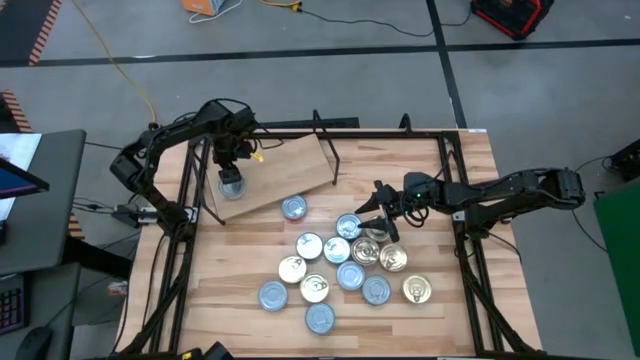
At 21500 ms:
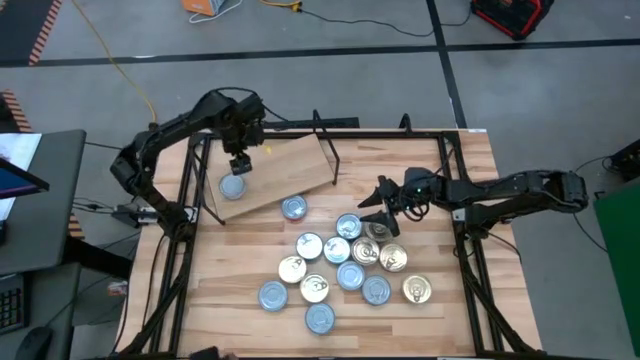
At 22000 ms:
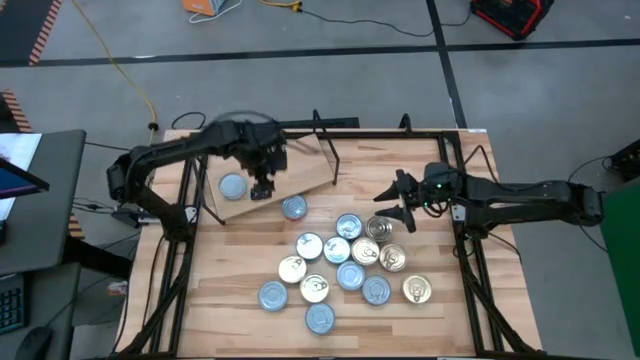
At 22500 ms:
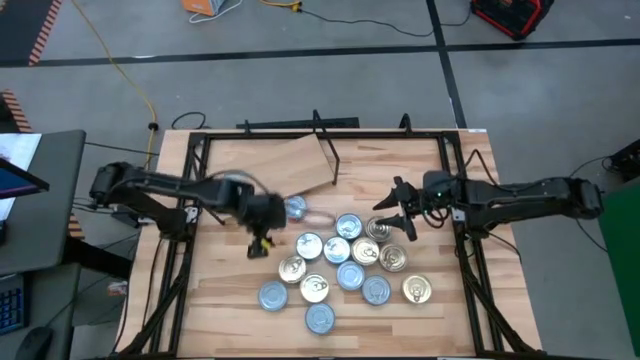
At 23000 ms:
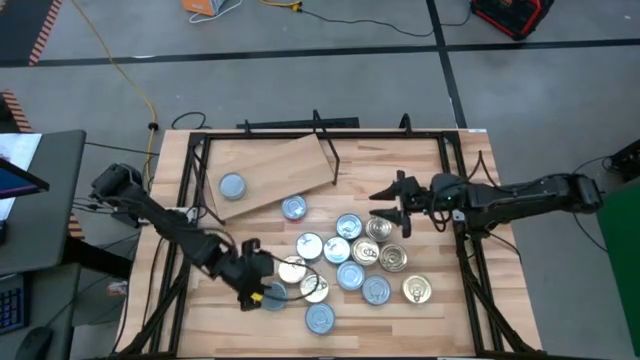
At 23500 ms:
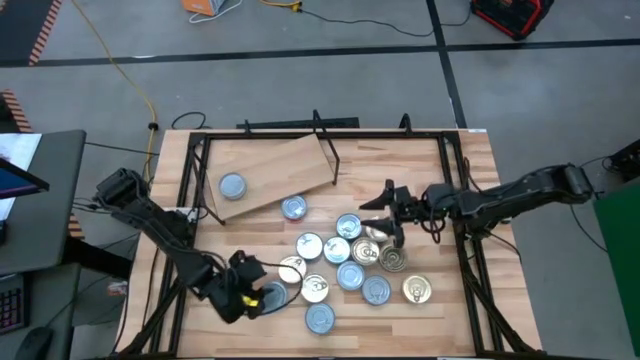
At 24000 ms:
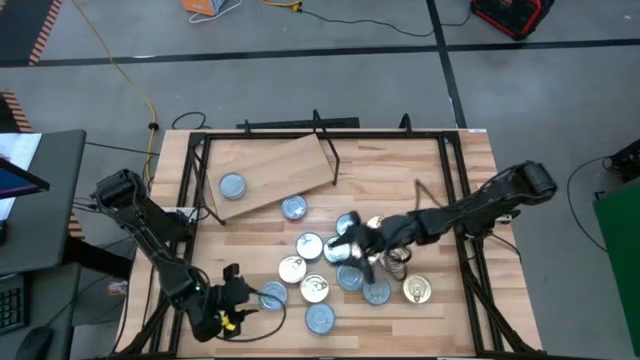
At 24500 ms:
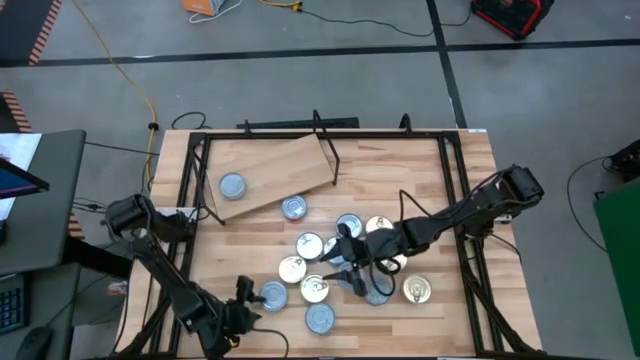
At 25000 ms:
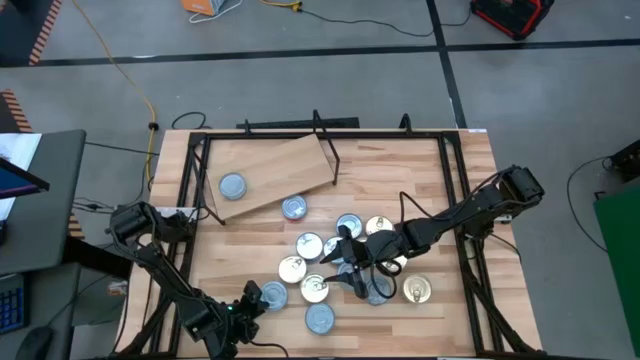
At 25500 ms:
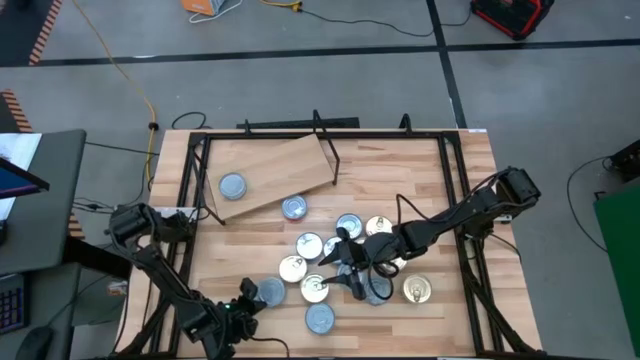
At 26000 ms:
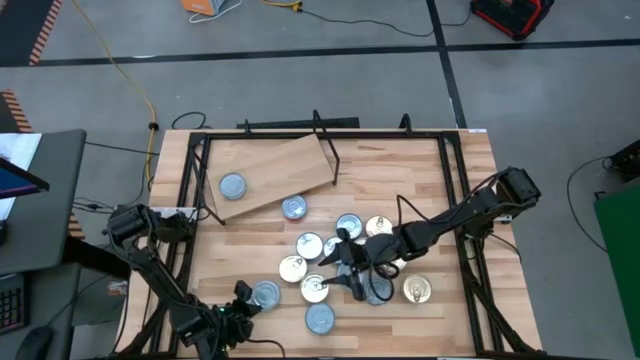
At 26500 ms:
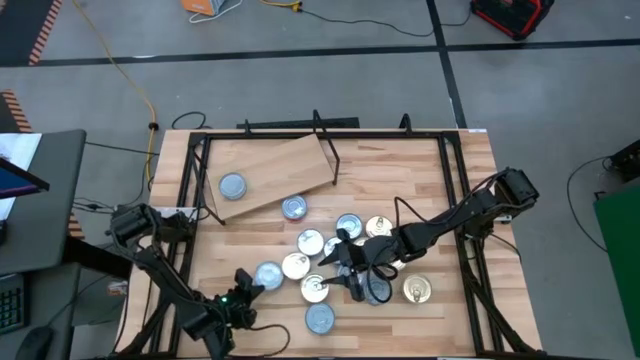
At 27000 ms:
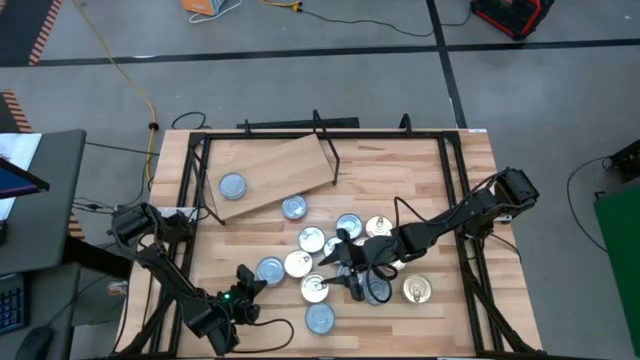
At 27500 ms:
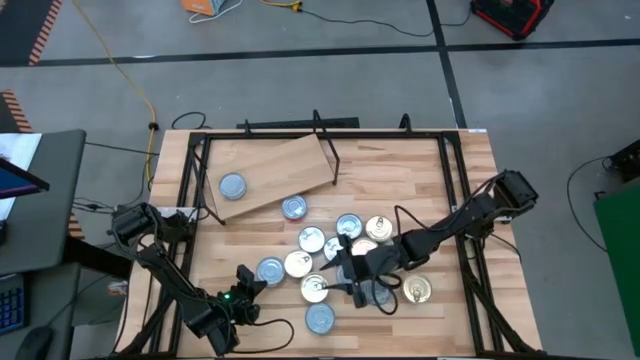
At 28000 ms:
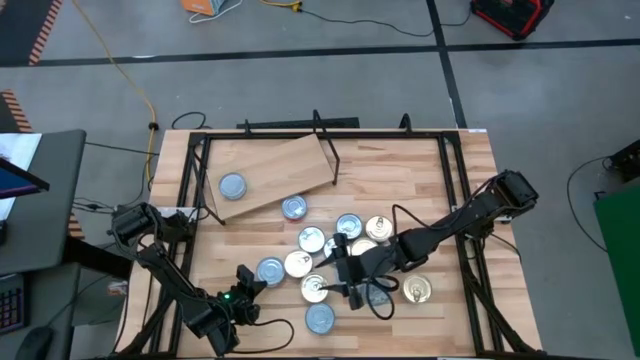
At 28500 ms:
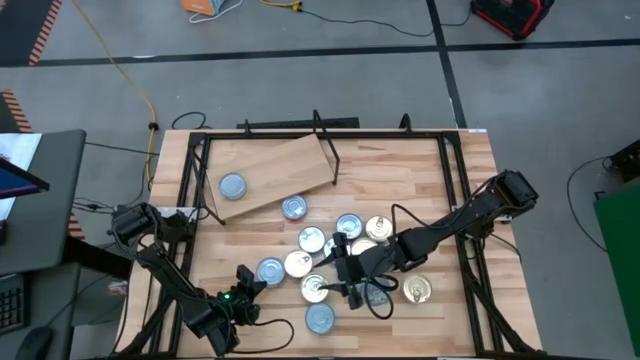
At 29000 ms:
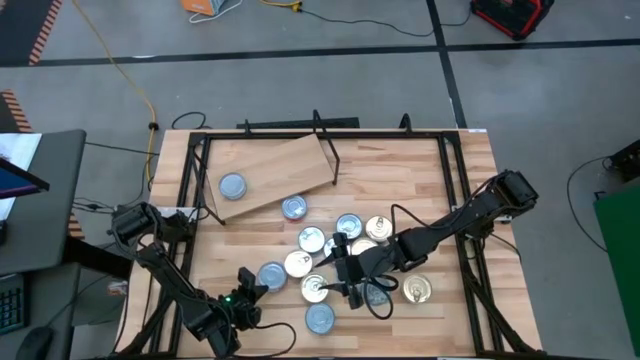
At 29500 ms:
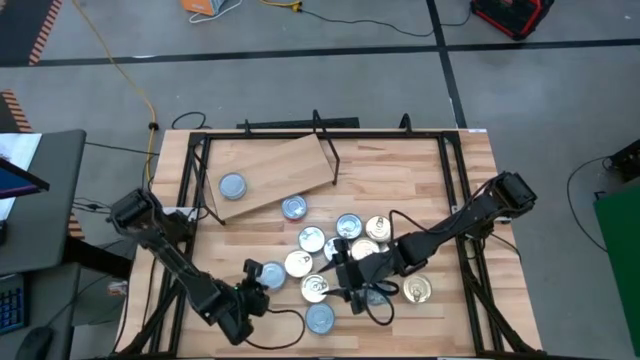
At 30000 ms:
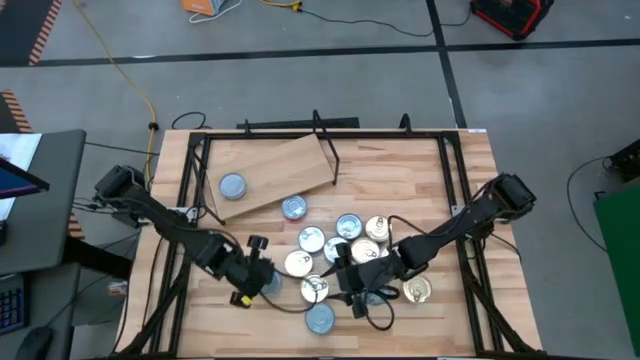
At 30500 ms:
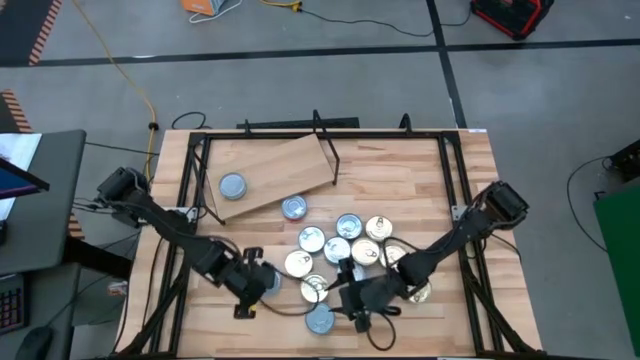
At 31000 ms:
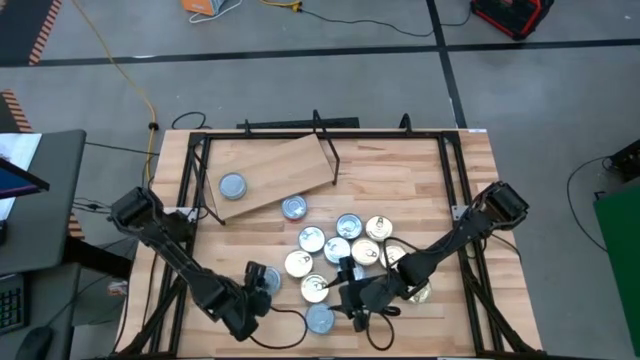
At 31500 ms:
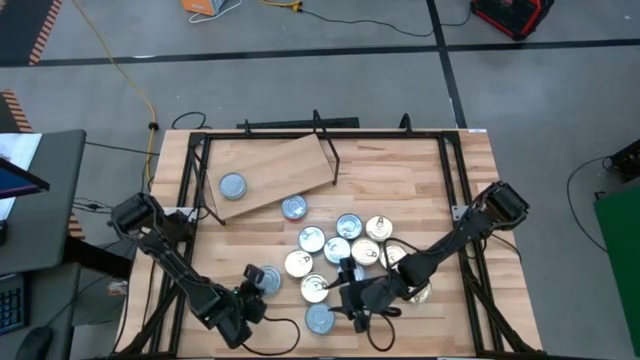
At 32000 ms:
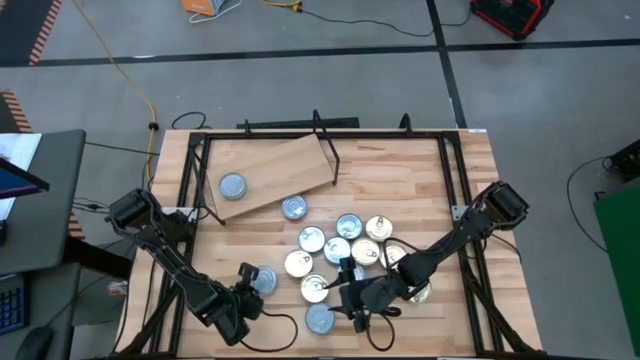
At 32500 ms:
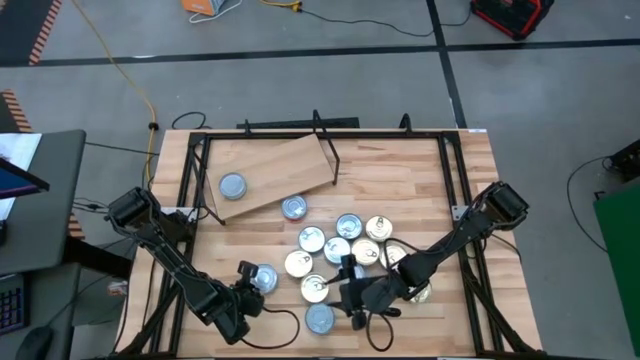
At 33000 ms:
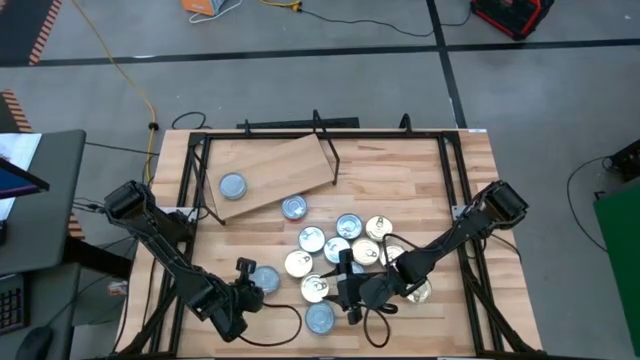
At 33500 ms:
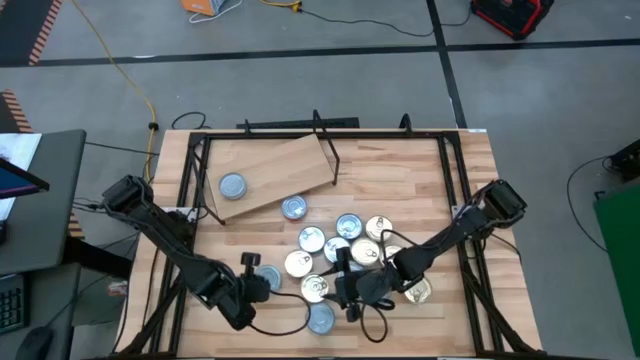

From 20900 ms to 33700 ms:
Task: Stack canned seafood by type on shelf
Stack the green white tuna can on top of the green white tuna can on the shelf

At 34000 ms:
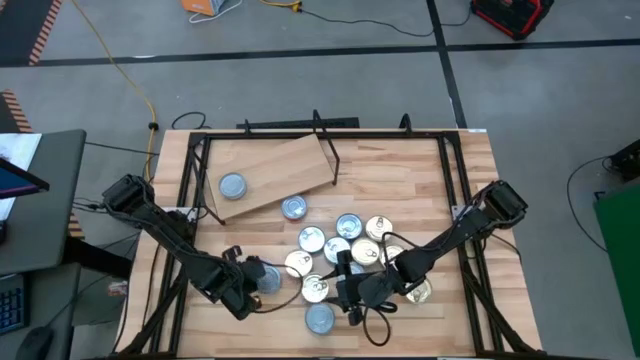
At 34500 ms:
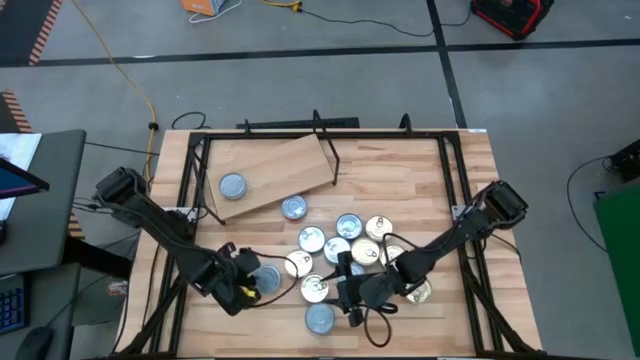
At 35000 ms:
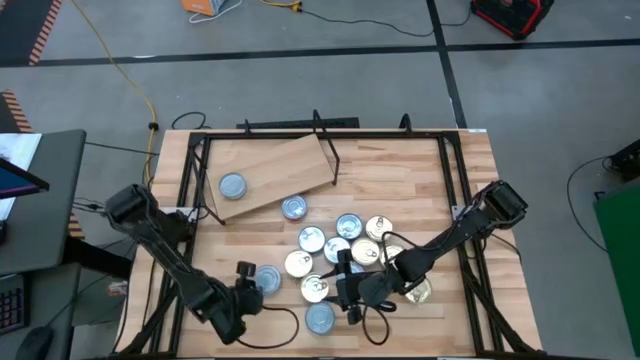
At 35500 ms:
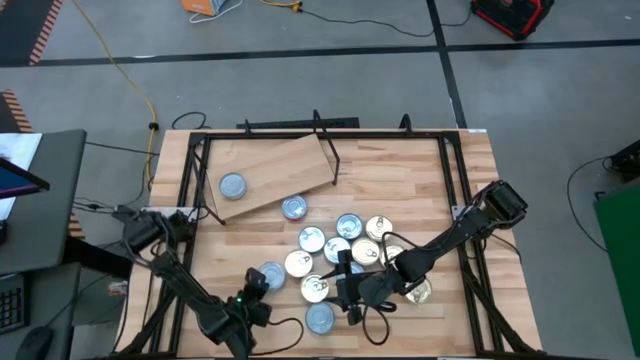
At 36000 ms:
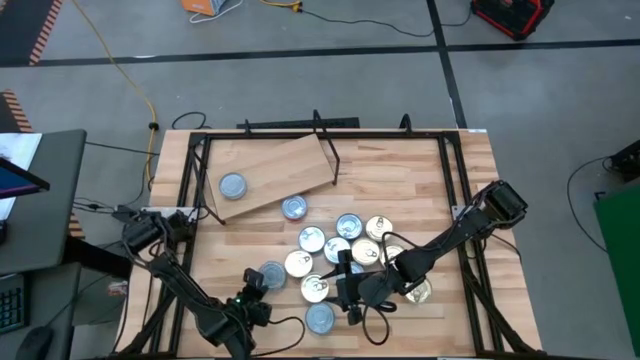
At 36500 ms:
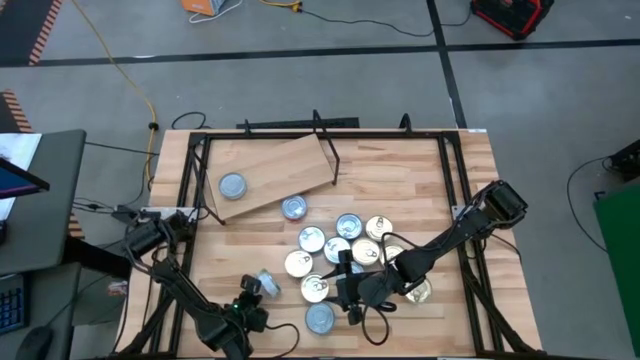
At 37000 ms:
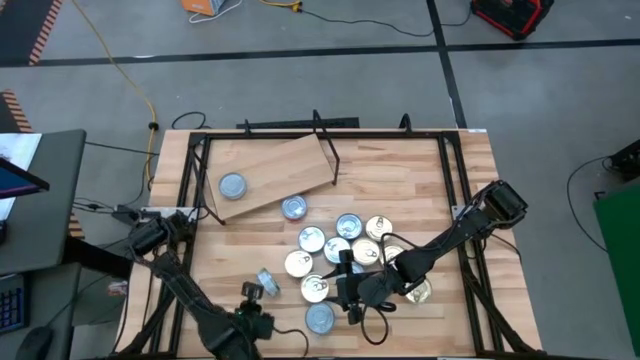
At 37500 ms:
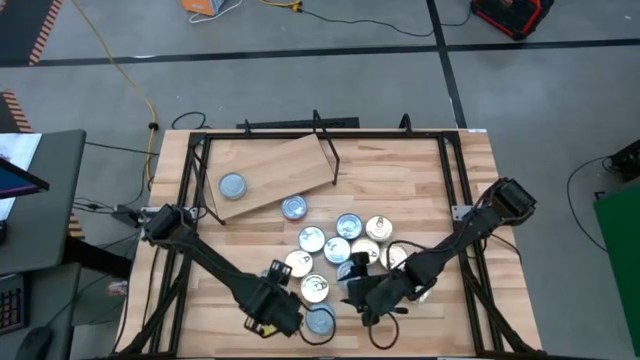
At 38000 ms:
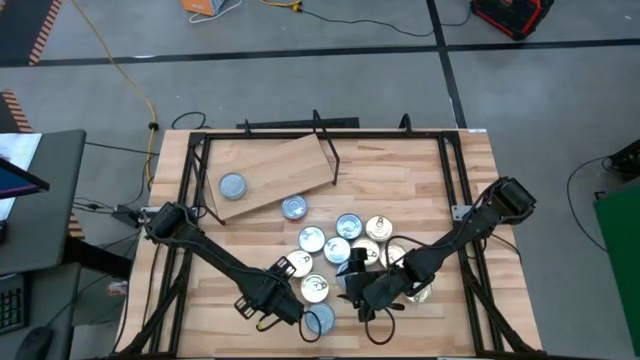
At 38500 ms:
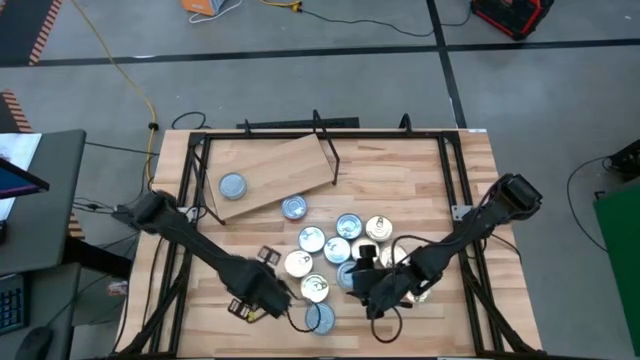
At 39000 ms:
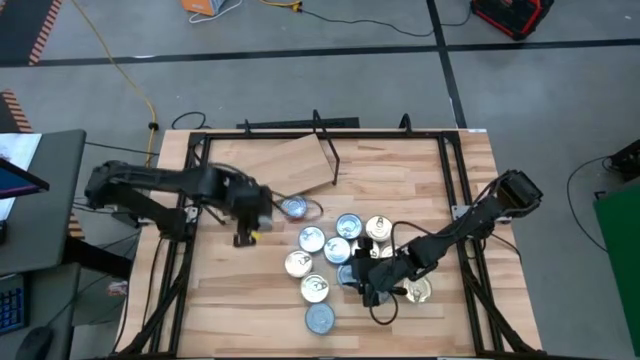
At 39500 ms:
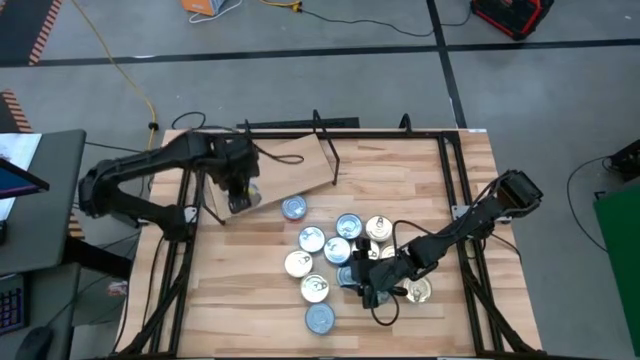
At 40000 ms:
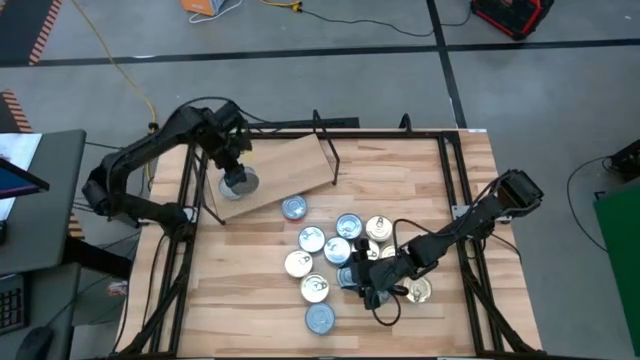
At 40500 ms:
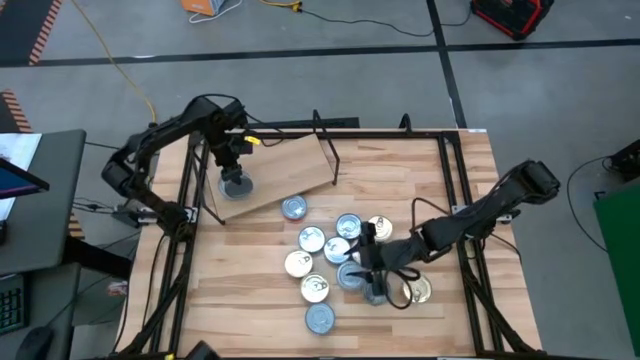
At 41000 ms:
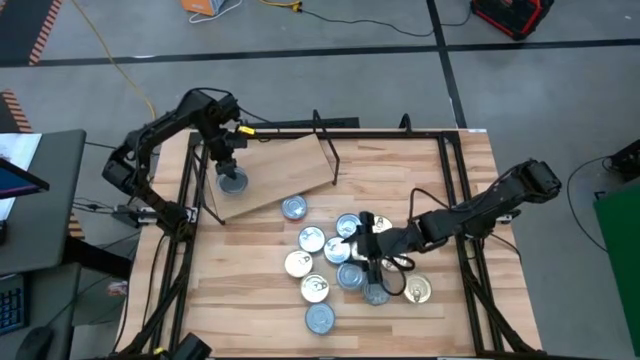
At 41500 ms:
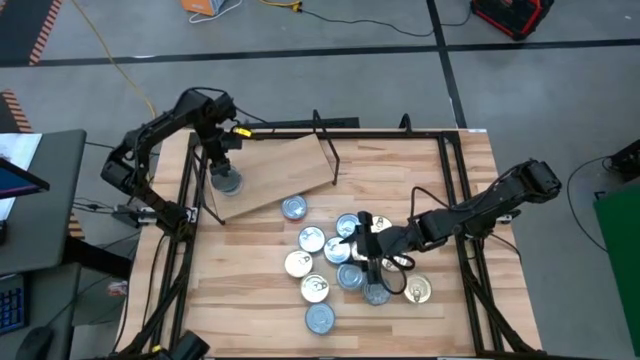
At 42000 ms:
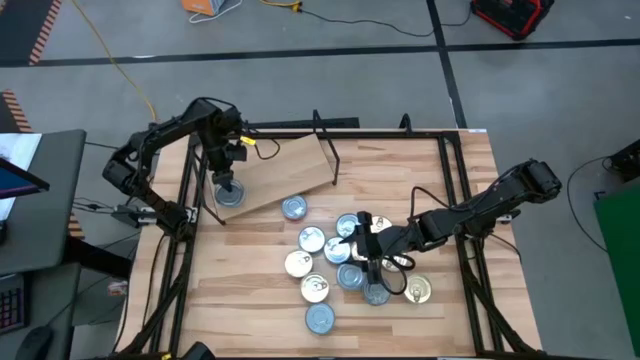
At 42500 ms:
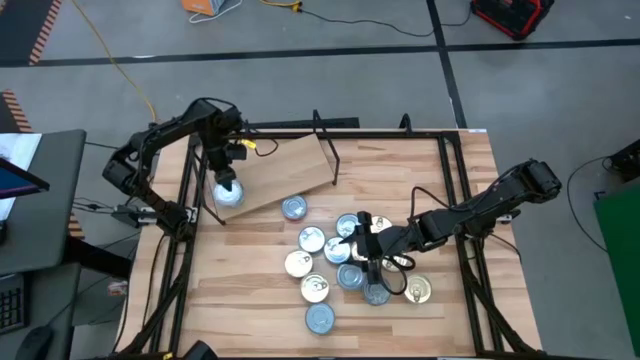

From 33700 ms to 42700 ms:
Stack the green white tuna can on top of the green white tuna can on the shelf
